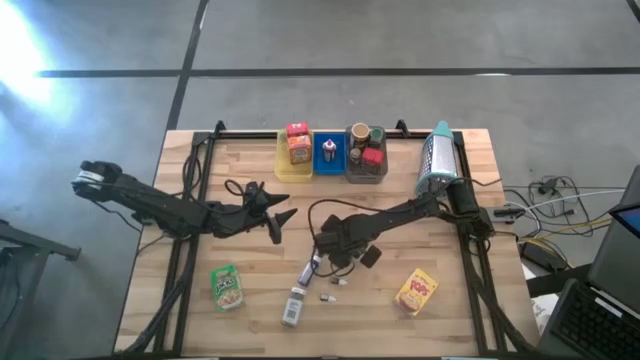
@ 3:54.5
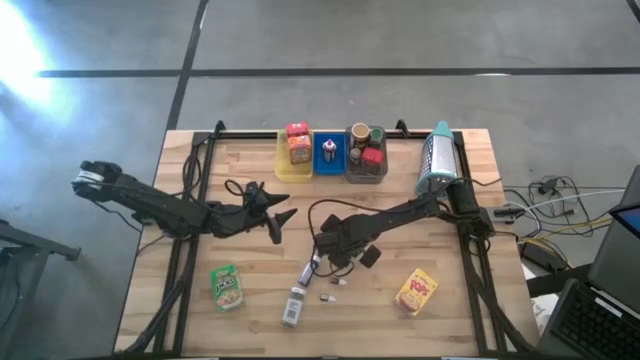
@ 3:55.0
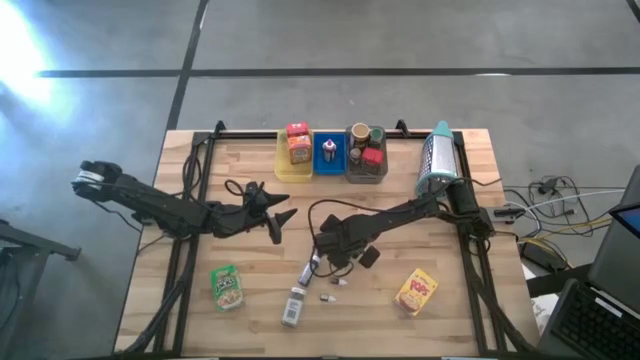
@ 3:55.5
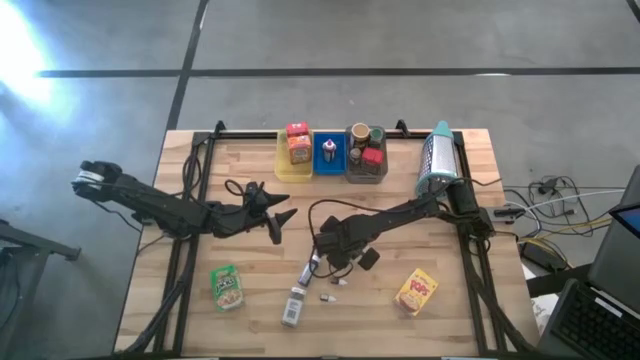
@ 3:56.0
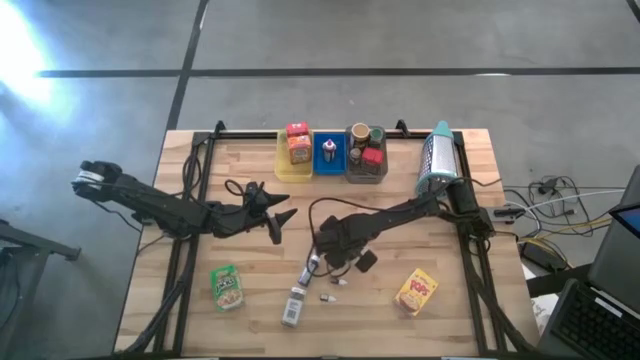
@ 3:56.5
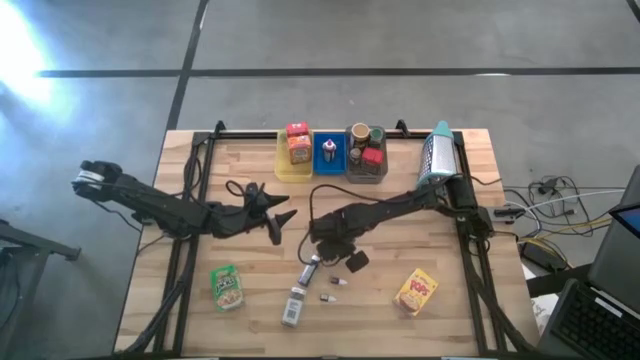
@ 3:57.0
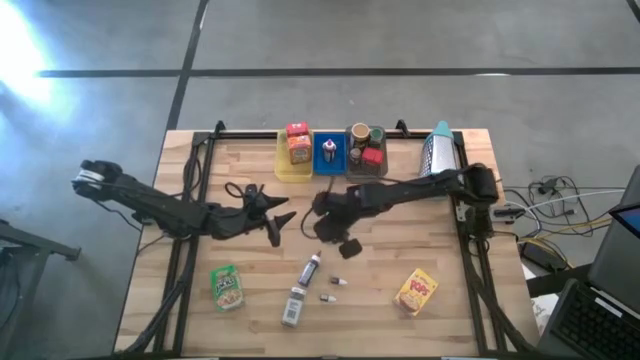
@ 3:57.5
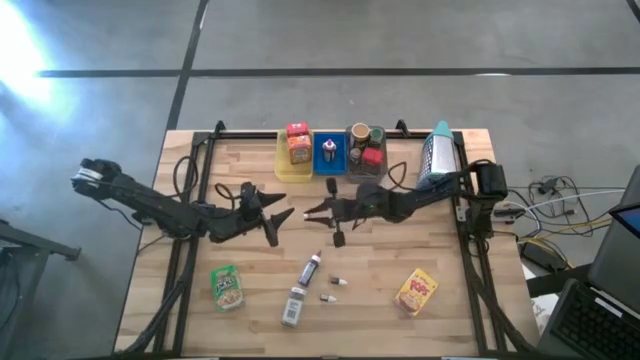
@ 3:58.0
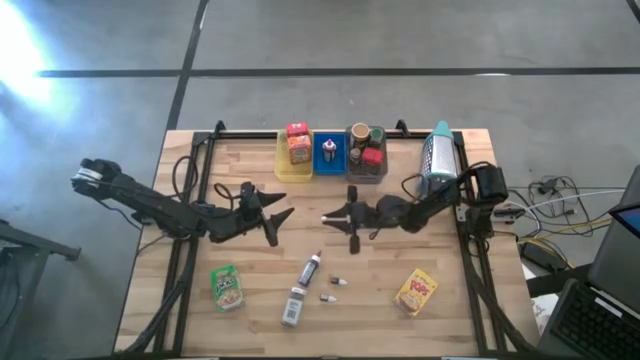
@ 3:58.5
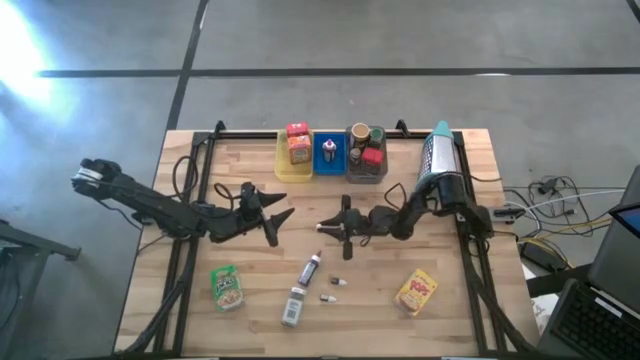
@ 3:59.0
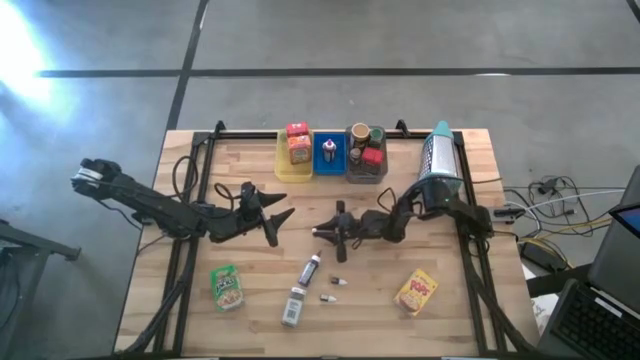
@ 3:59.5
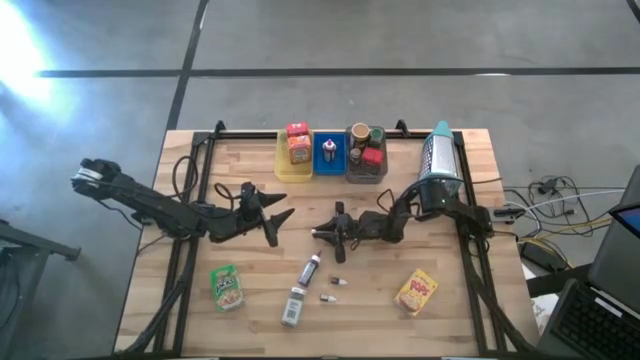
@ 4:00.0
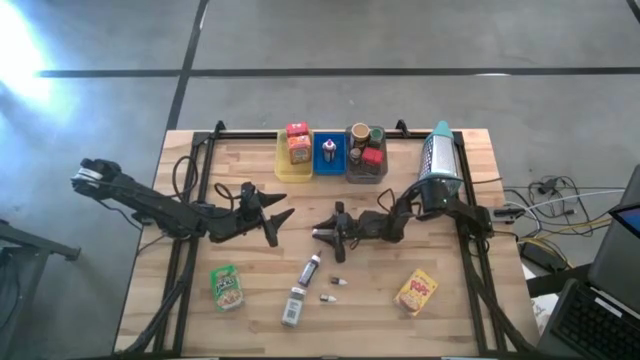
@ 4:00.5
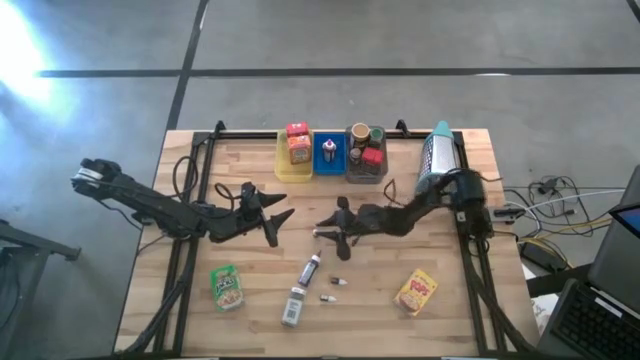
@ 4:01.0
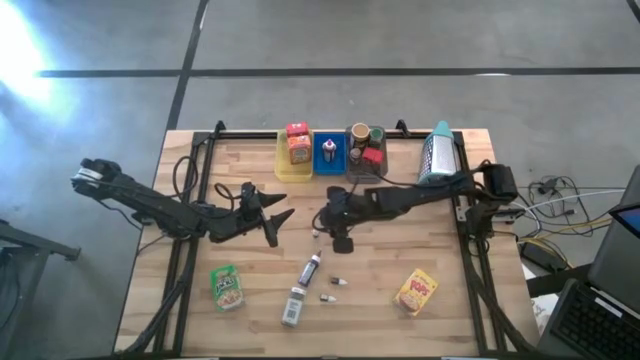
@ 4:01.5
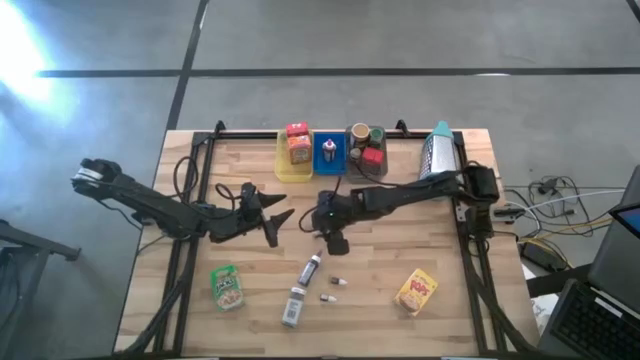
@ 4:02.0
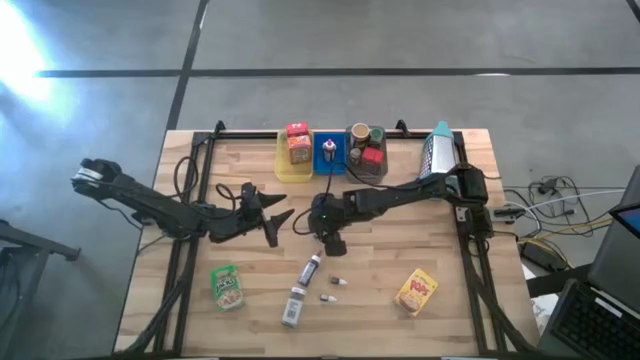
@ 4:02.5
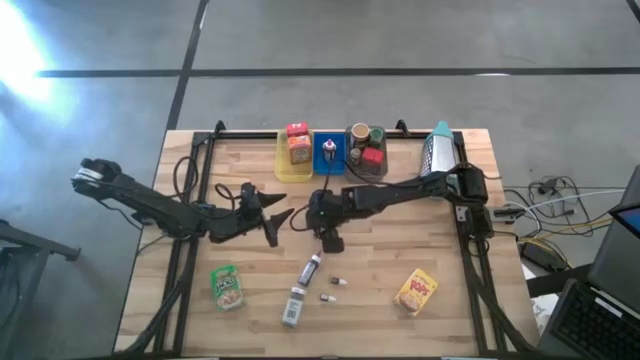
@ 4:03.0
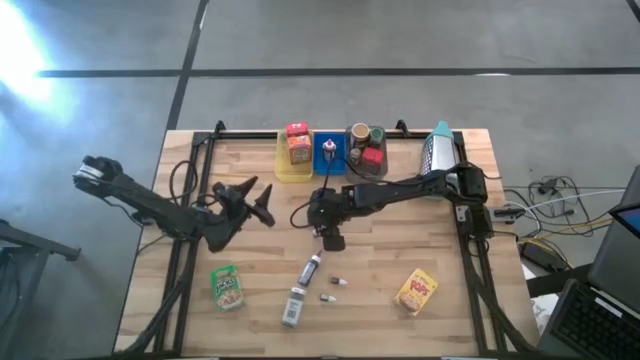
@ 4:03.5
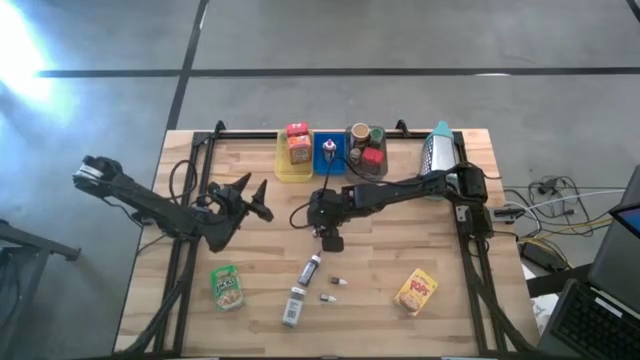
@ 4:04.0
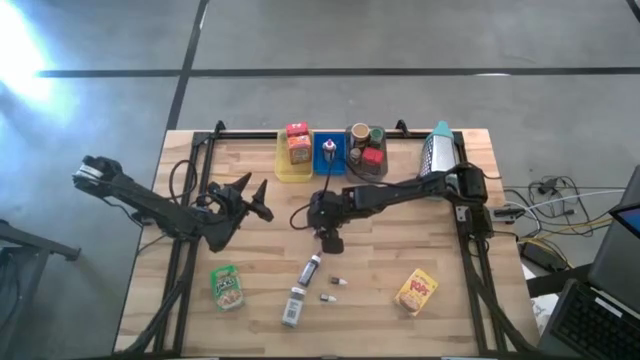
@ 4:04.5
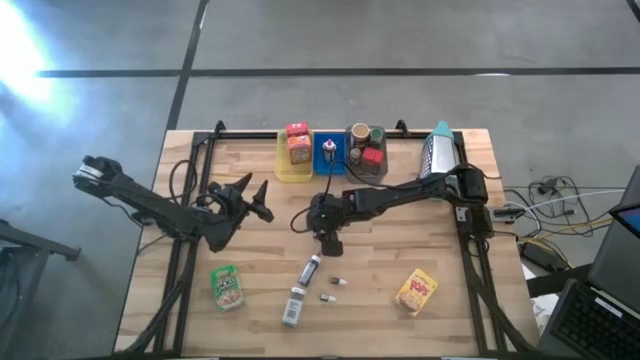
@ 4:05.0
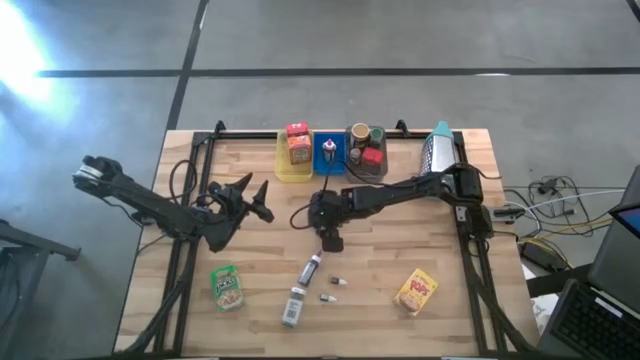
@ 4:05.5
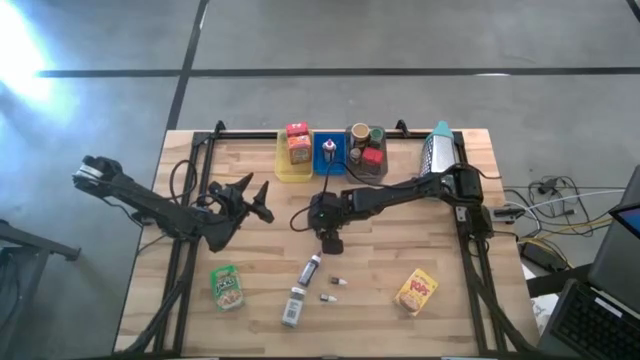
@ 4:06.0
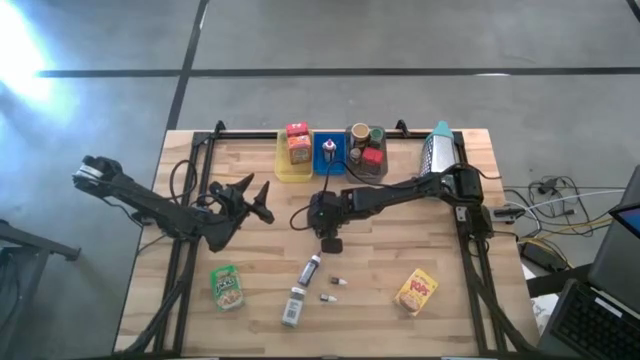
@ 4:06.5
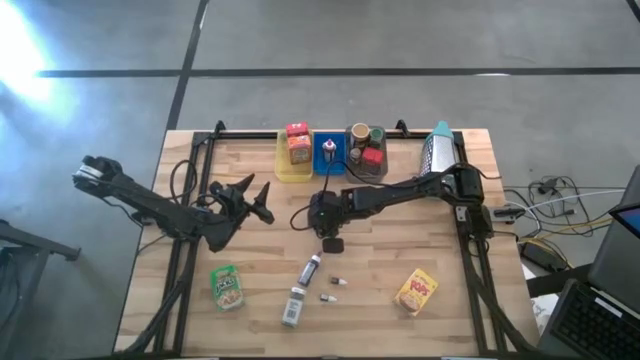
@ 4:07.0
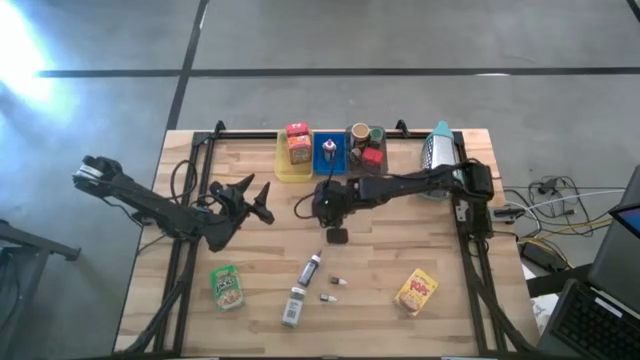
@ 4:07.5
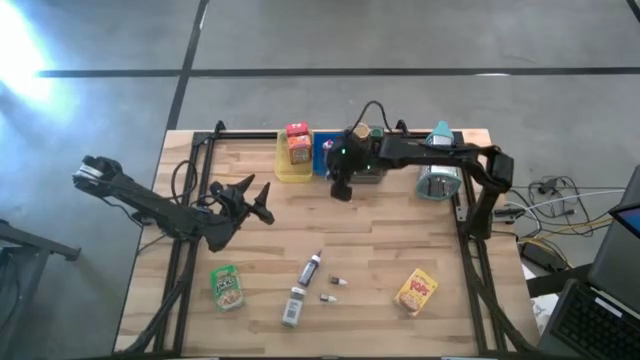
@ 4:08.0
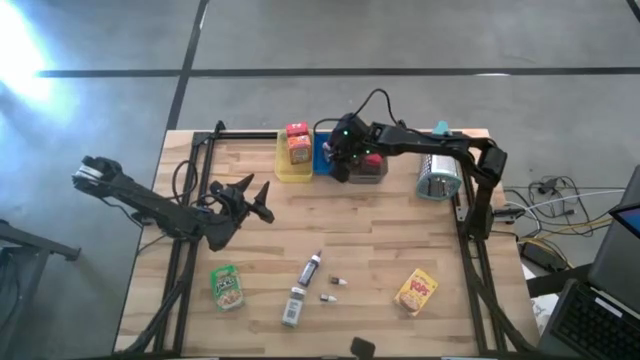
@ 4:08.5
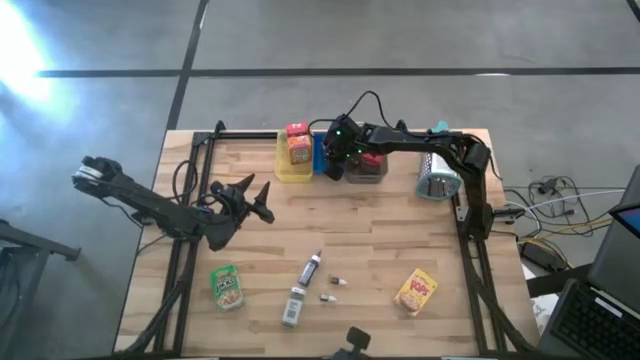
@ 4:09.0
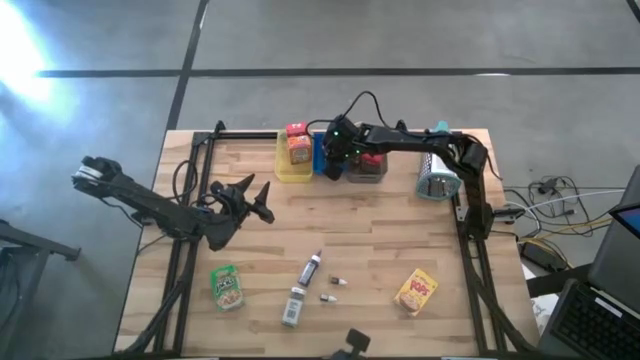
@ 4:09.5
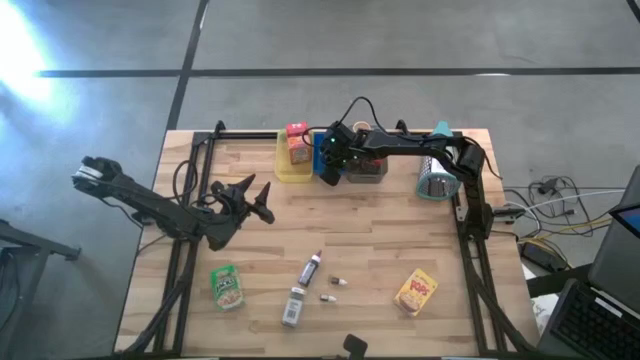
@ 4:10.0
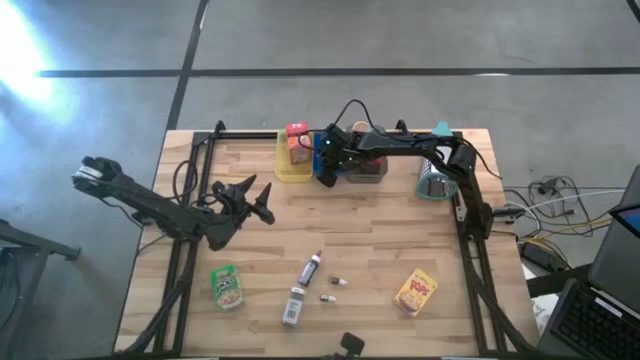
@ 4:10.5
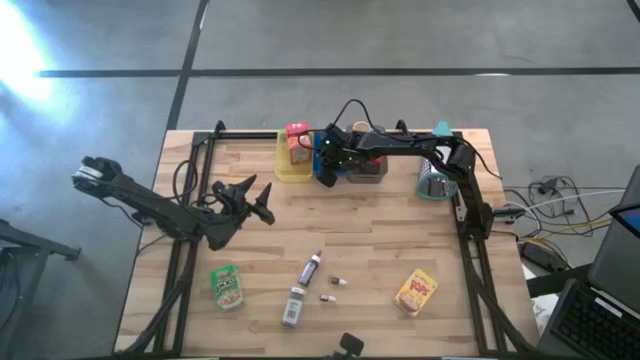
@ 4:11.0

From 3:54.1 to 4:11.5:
Task: Pick & Place Kitchen Items
Put the small blue food coloring bottle into the blue bin

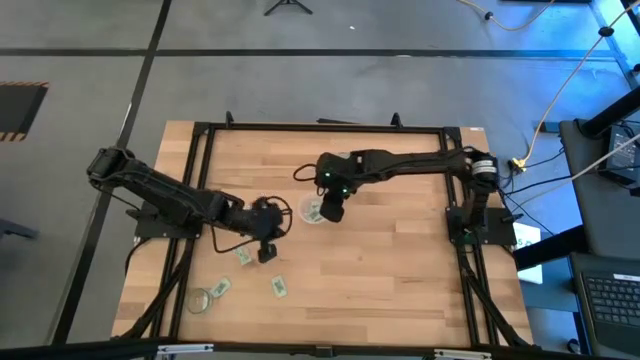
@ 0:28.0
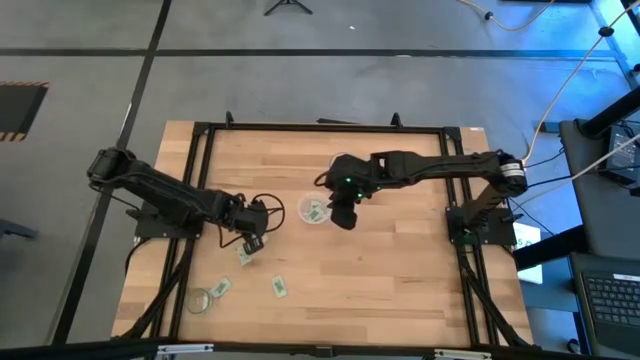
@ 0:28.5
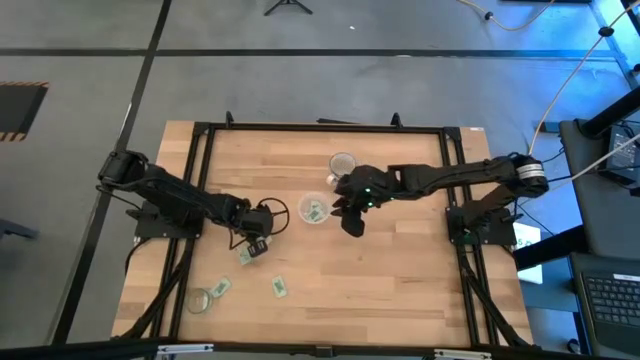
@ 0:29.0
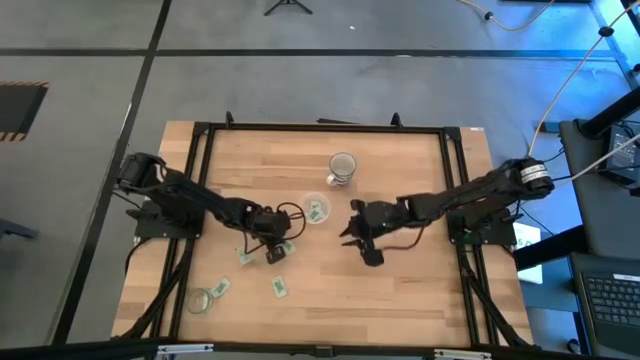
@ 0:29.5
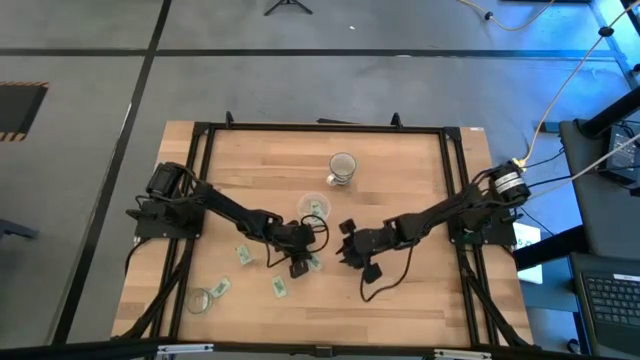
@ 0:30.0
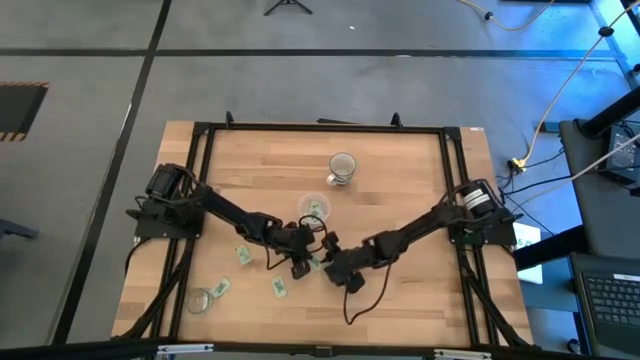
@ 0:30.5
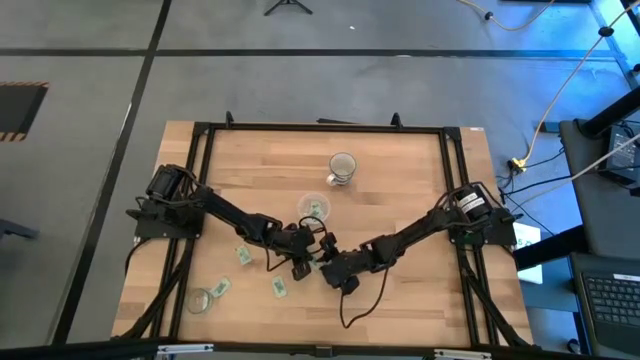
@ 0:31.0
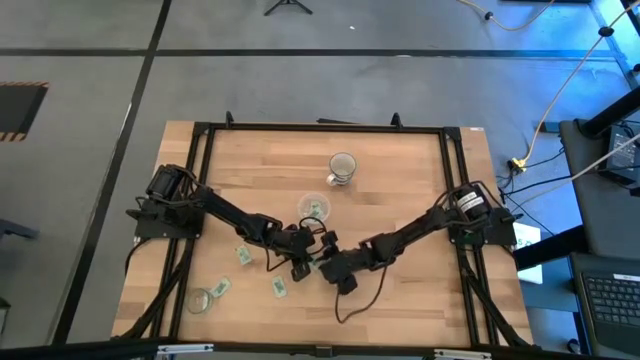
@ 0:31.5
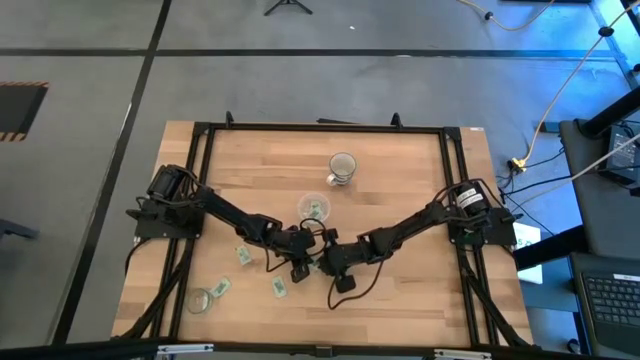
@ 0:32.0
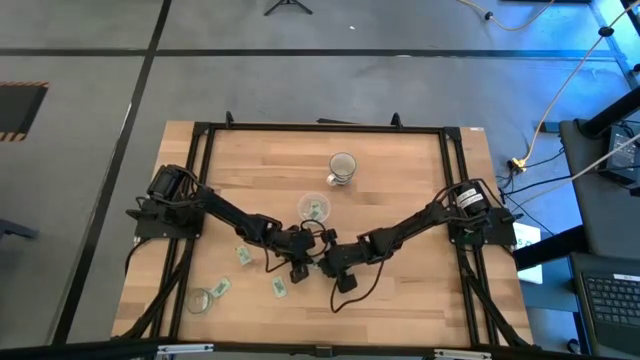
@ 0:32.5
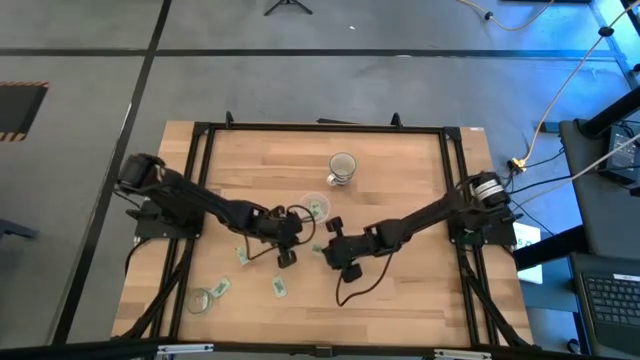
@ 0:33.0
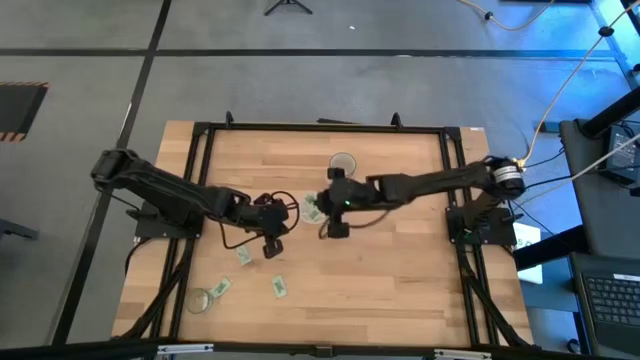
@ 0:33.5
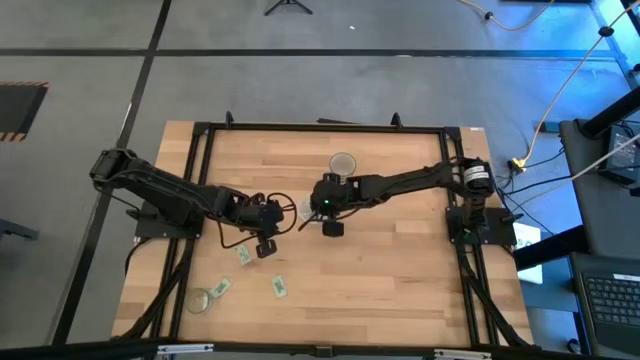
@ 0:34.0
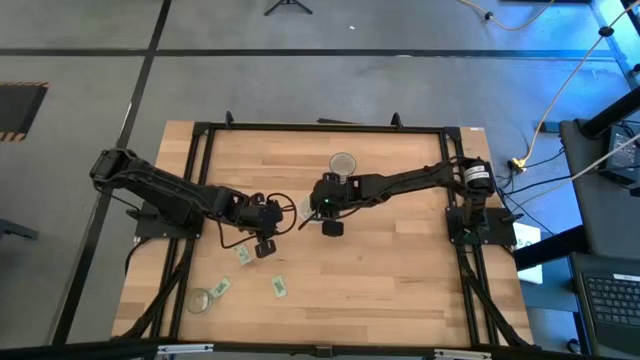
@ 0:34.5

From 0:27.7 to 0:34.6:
Task: Pick and place Stevia / Truvia into bins
Put the stevia packet into the transparent container
